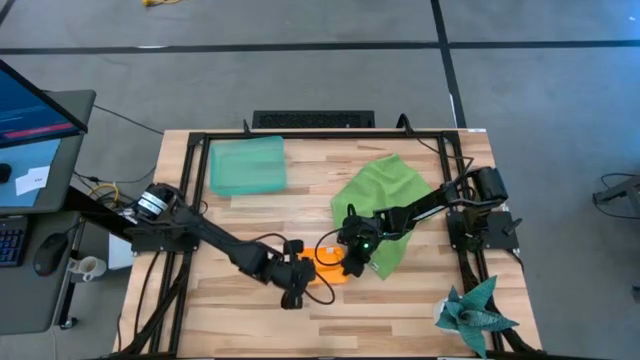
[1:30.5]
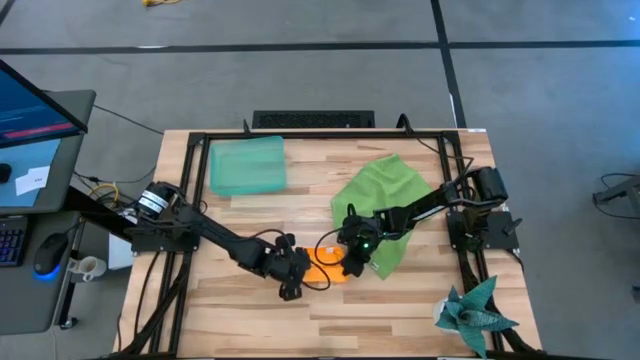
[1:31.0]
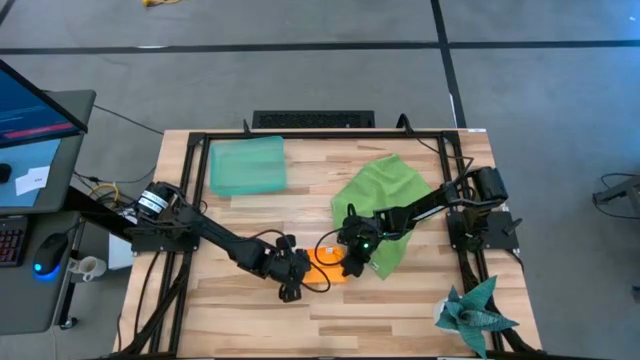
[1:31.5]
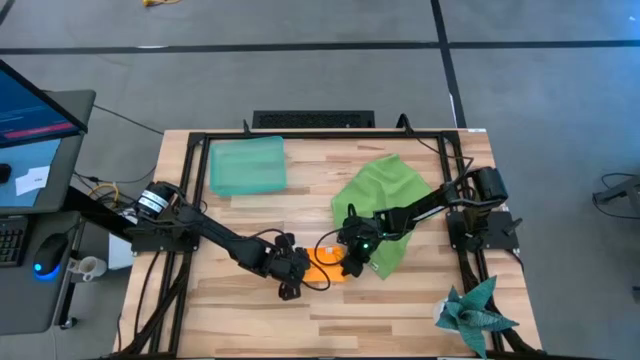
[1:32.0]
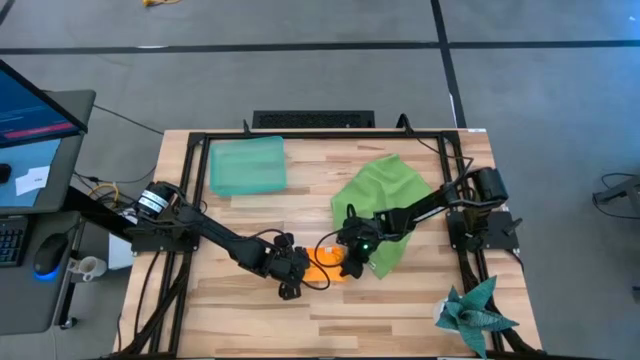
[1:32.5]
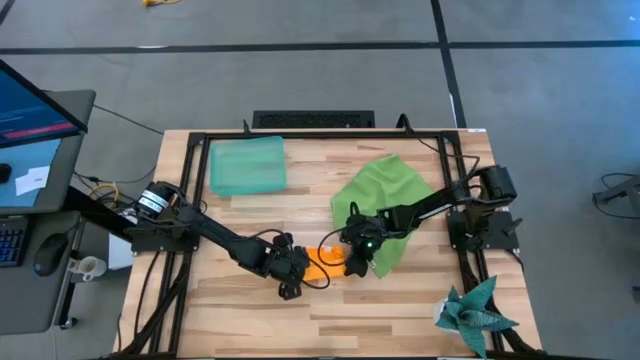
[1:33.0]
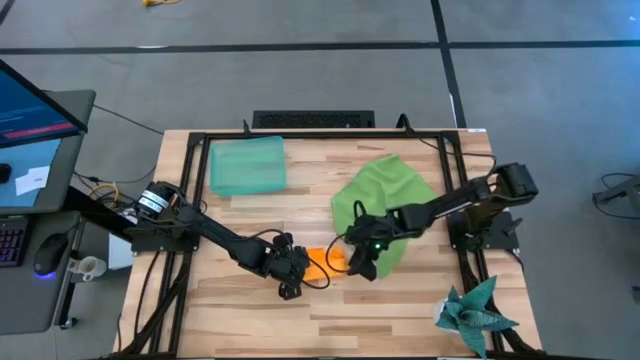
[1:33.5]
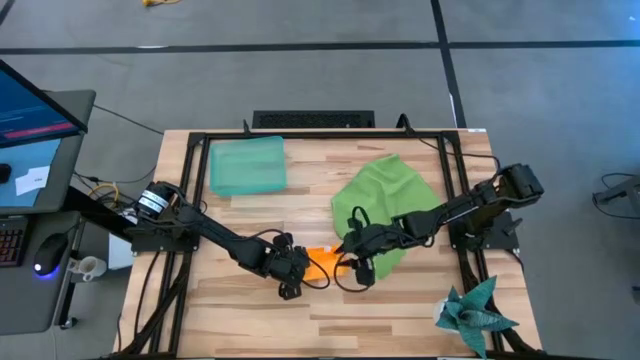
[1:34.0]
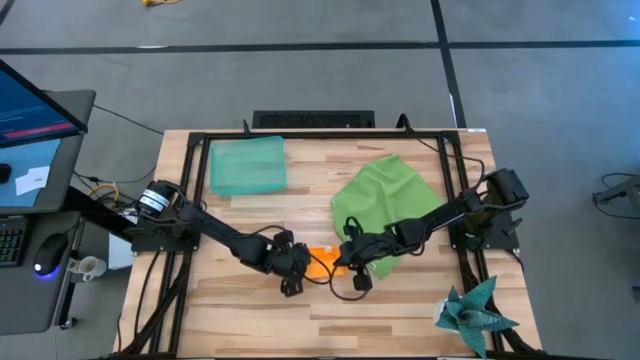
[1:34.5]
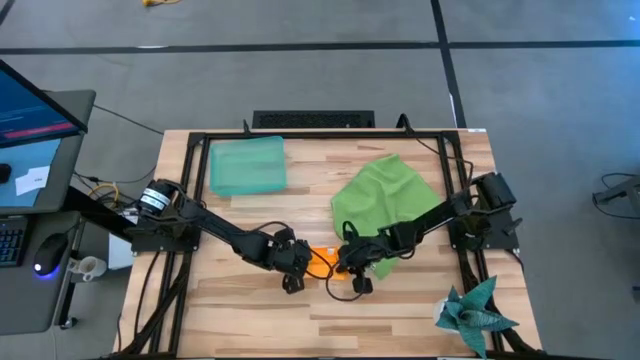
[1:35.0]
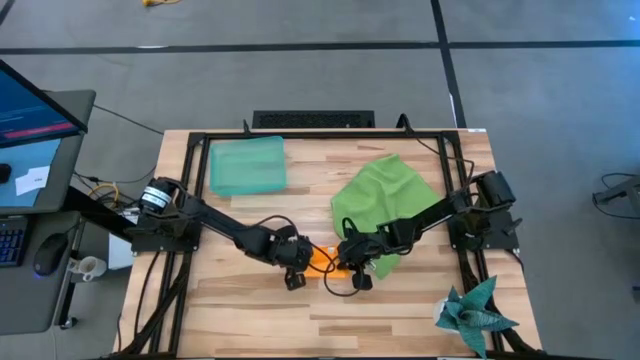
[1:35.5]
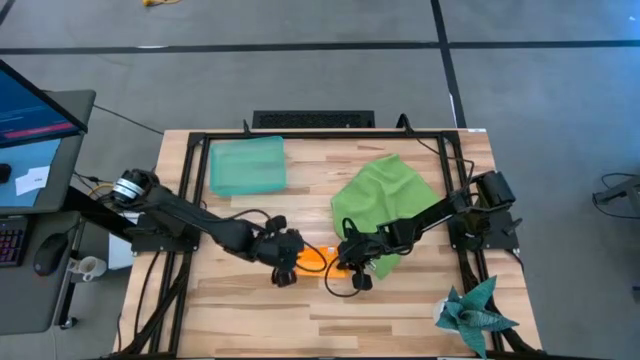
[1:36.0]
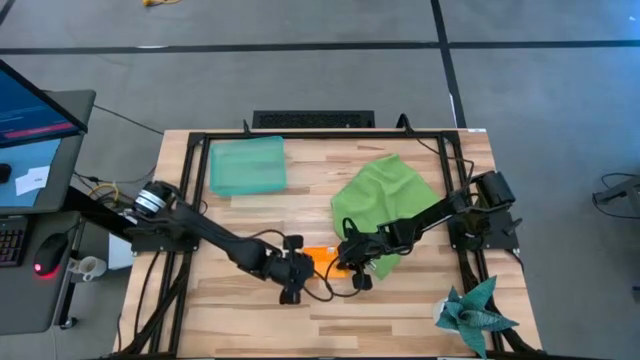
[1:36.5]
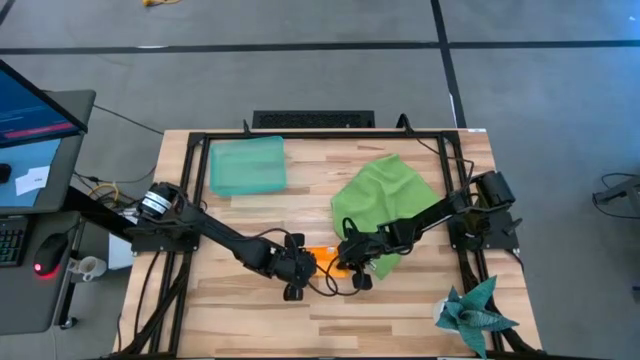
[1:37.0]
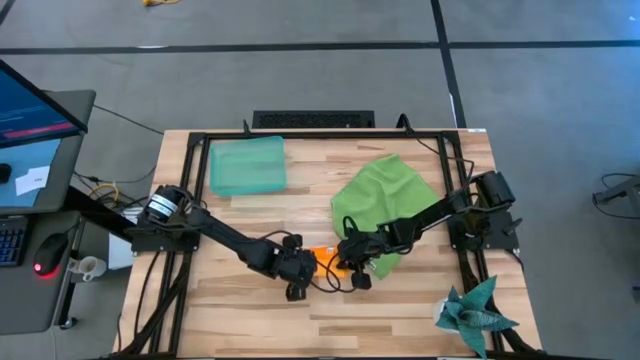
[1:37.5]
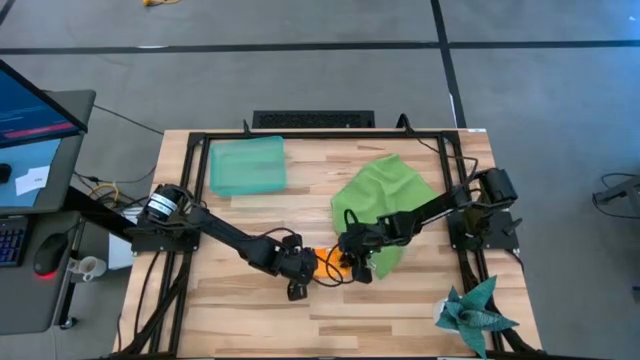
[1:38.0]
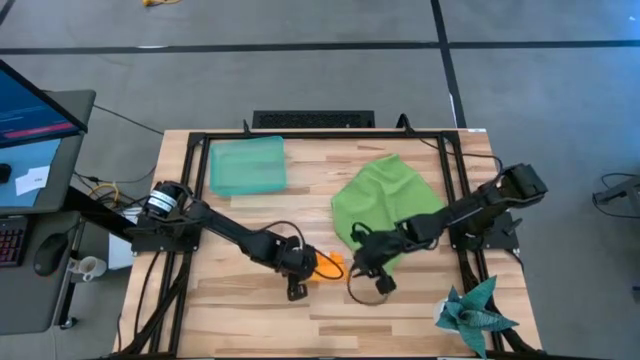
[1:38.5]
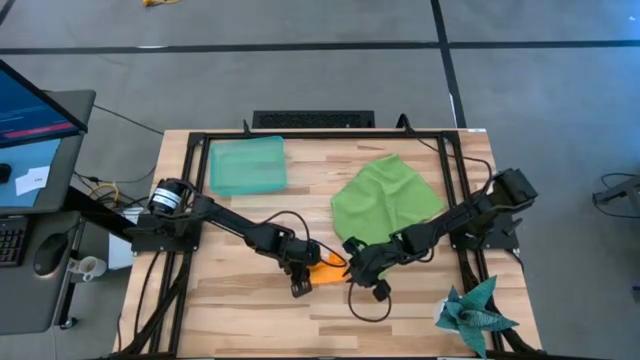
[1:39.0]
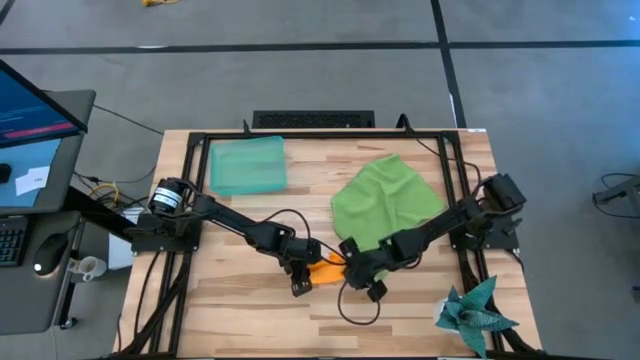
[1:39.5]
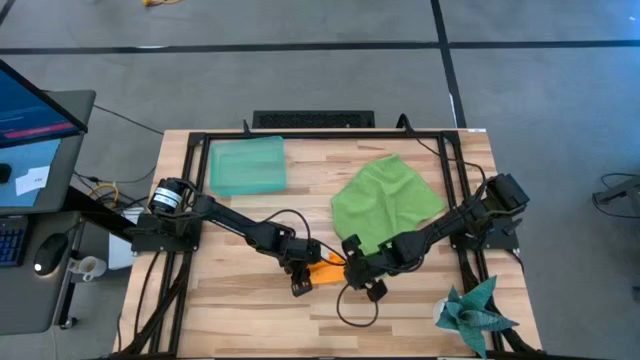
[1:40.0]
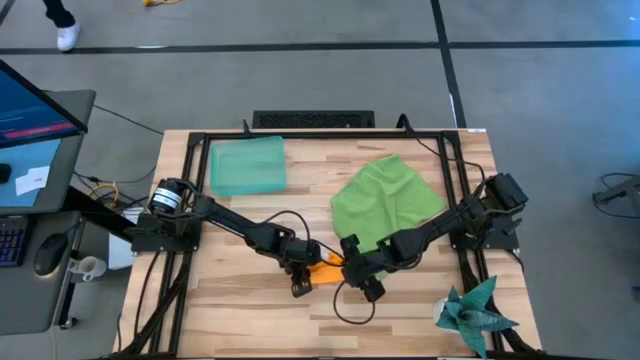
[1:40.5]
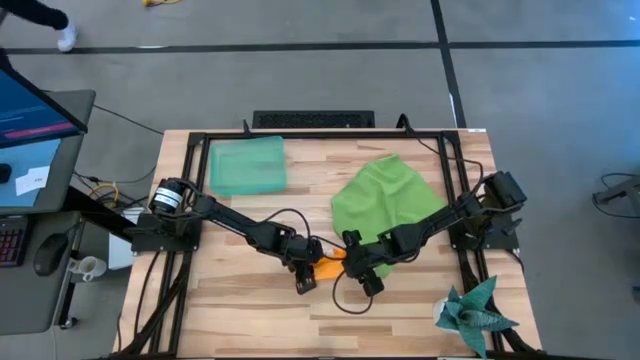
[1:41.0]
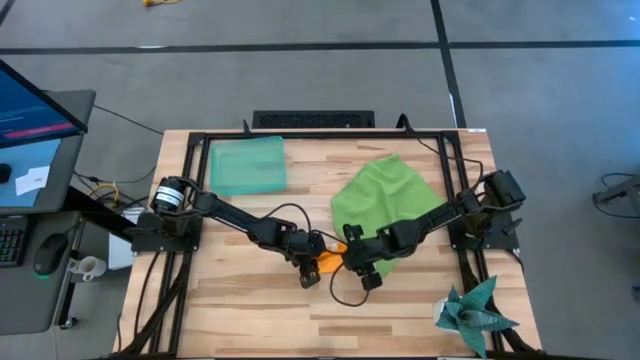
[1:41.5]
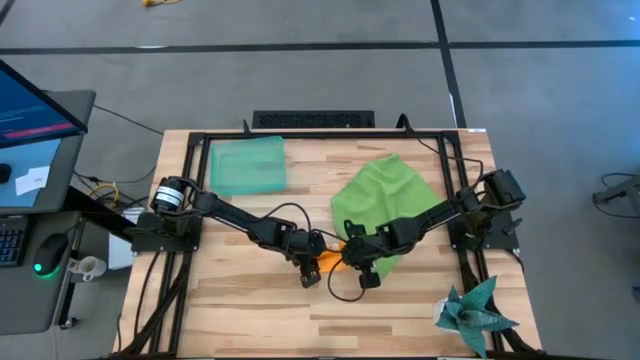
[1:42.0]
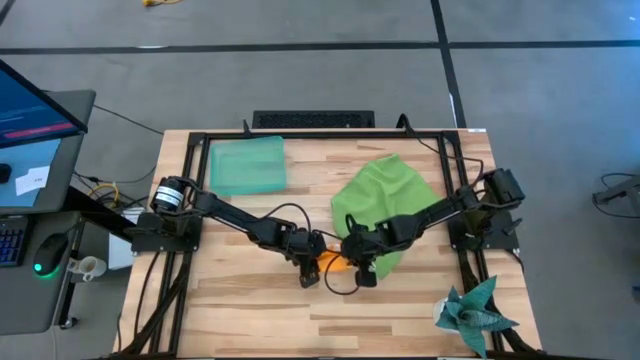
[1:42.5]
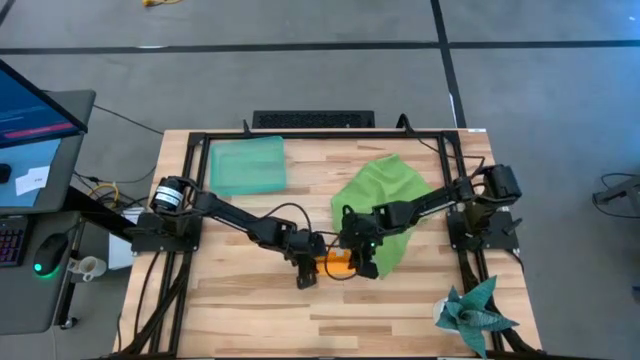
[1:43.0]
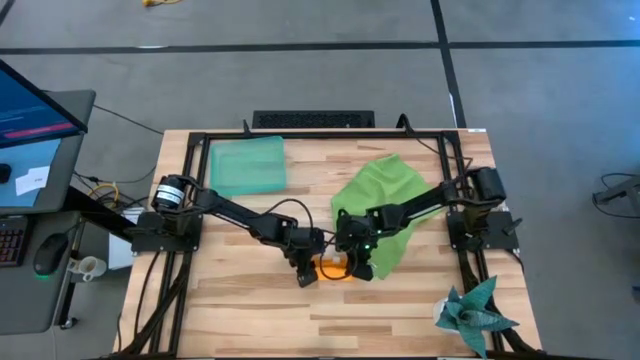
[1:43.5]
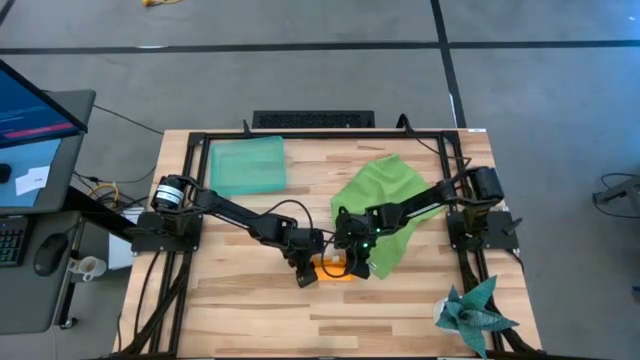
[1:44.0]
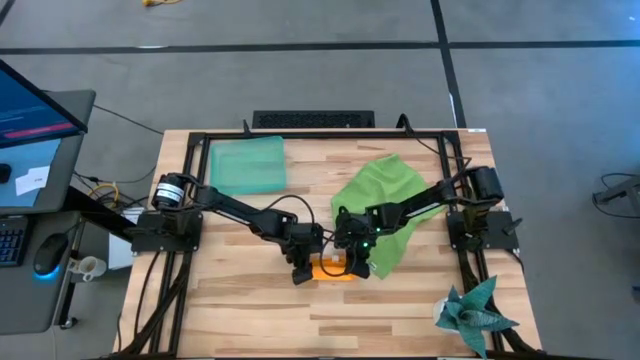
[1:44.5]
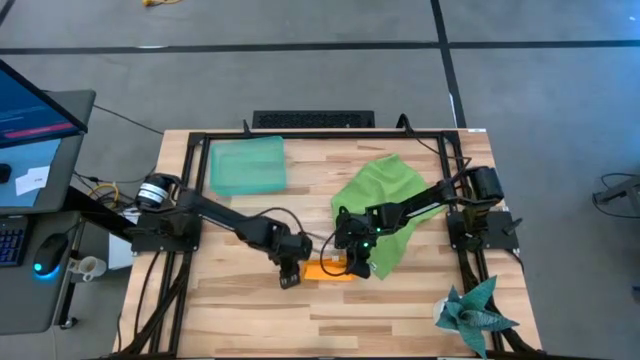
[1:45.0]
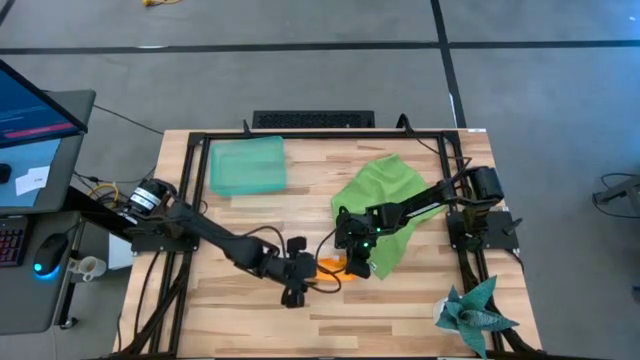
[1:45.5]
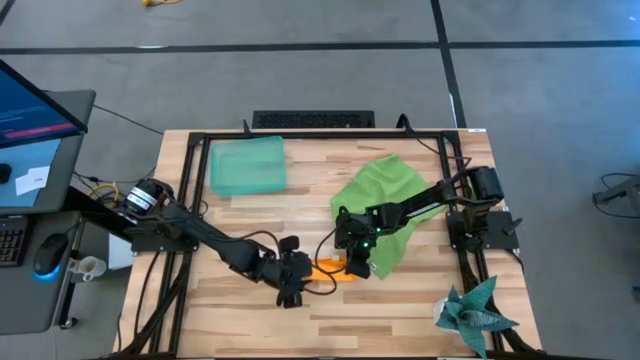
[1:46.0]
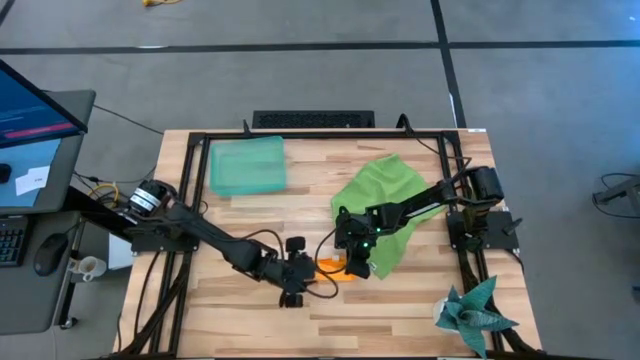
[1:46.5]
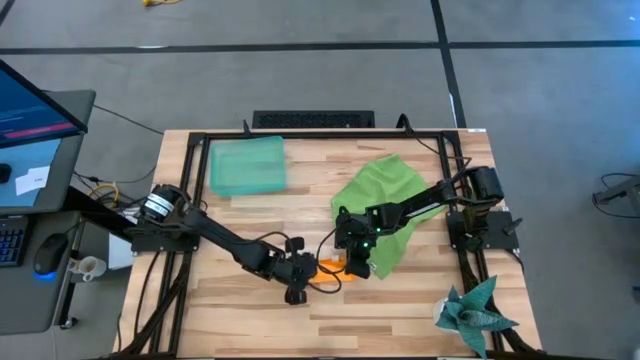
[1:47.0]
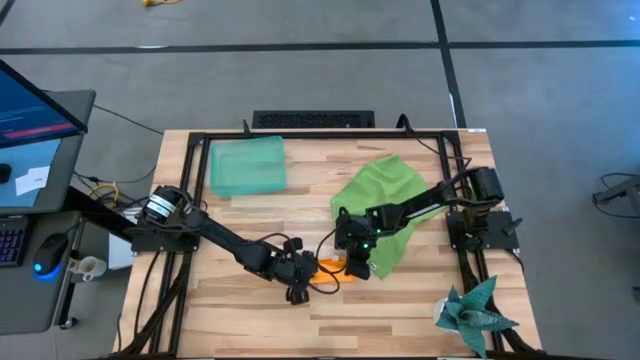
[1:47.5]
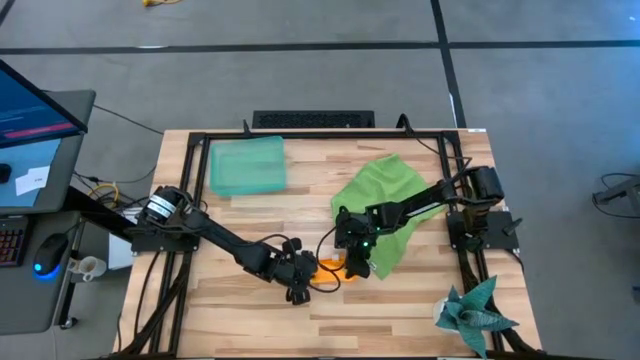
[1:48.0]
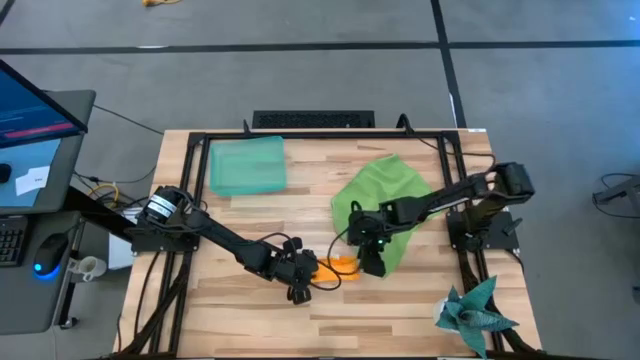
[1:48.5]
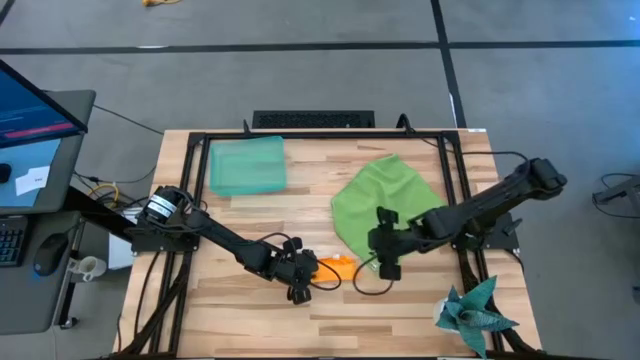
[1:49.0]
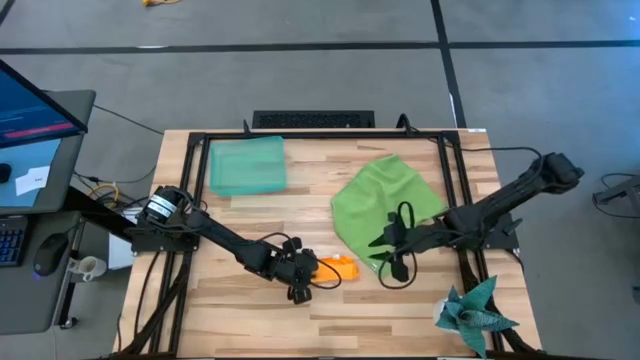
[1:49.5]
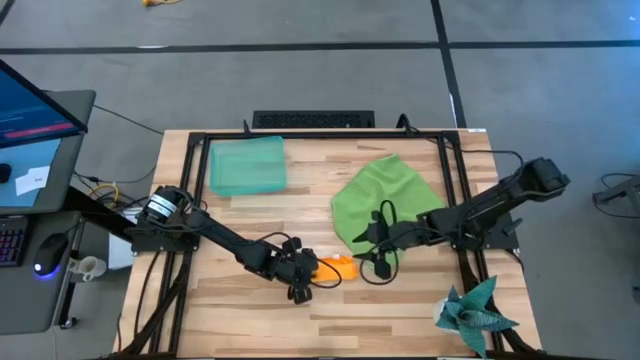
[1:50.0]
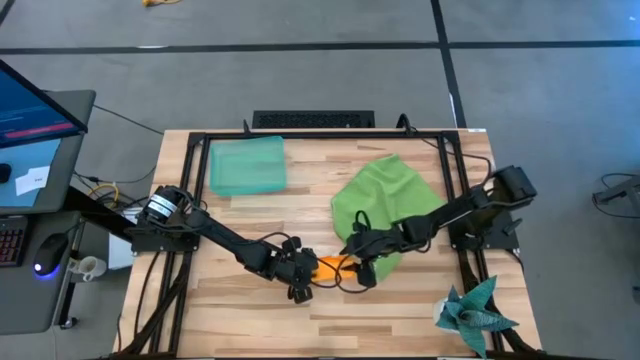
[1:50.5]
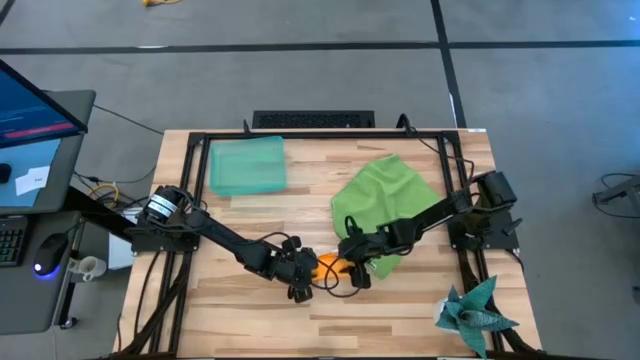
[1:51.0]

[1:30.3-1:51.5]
Task: Roll microfiber towels into tight, uniform cylinder then place into a basket
Roll the yellow microfiber cloth
